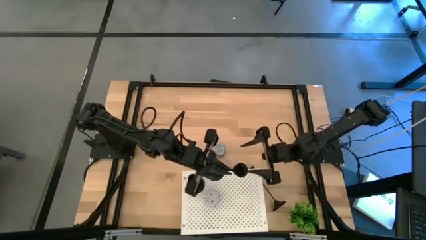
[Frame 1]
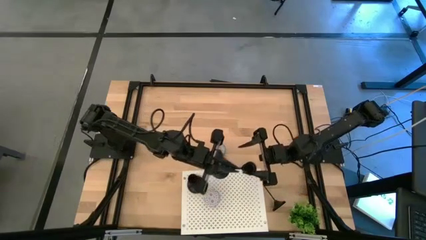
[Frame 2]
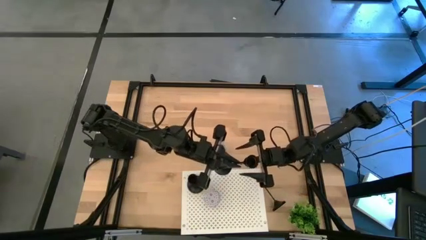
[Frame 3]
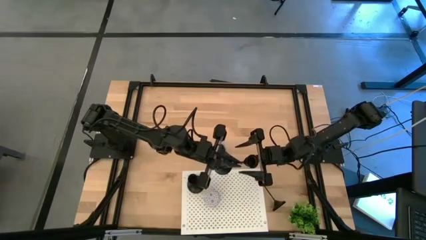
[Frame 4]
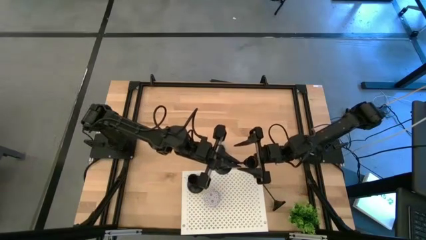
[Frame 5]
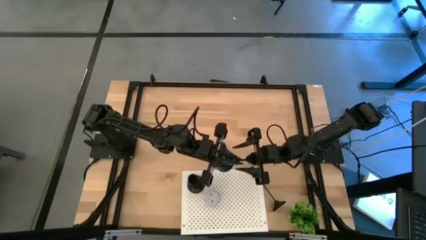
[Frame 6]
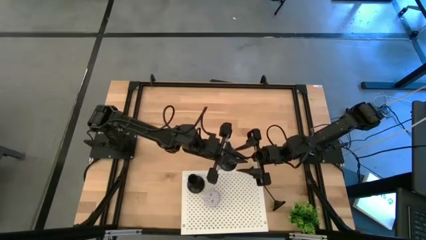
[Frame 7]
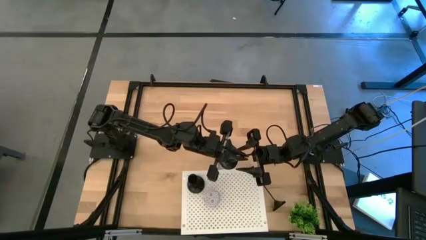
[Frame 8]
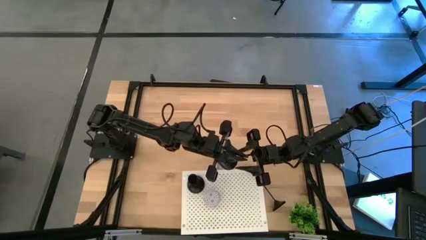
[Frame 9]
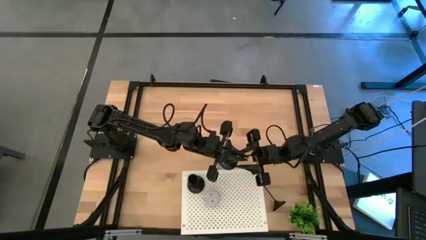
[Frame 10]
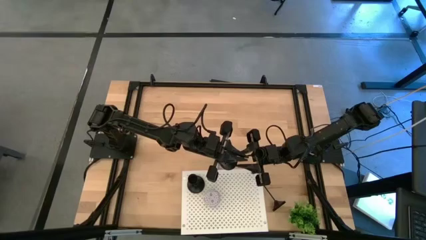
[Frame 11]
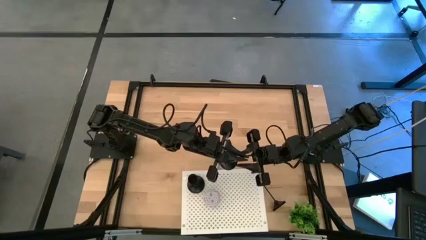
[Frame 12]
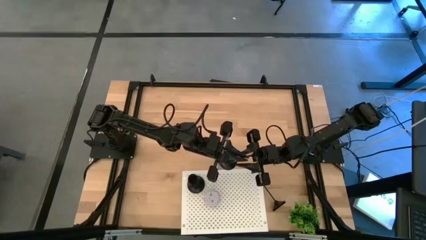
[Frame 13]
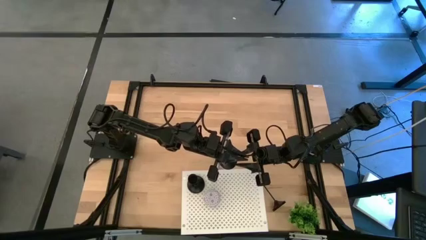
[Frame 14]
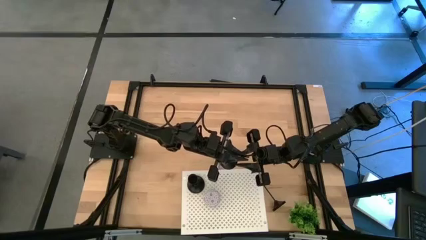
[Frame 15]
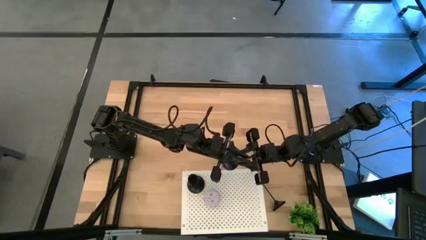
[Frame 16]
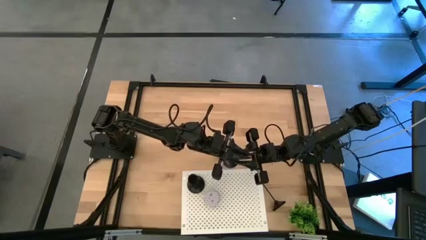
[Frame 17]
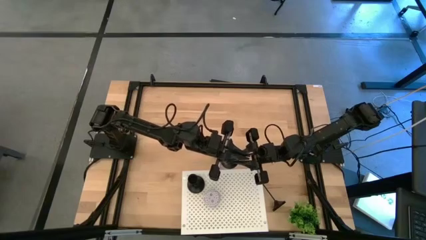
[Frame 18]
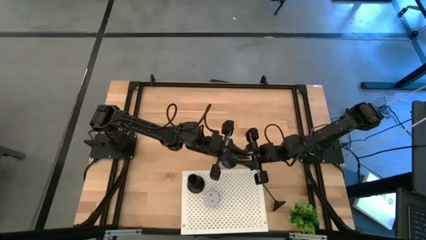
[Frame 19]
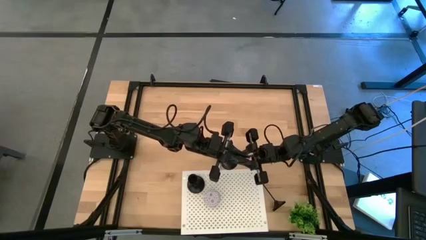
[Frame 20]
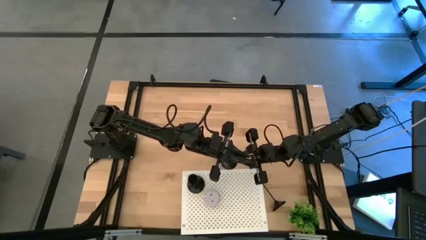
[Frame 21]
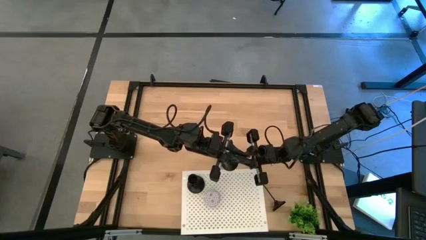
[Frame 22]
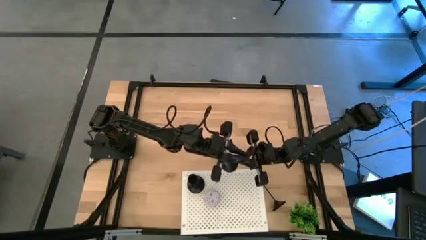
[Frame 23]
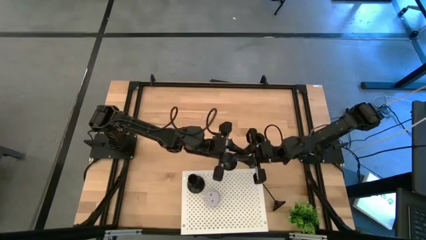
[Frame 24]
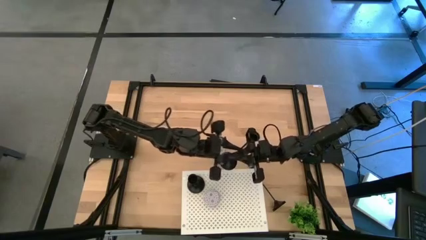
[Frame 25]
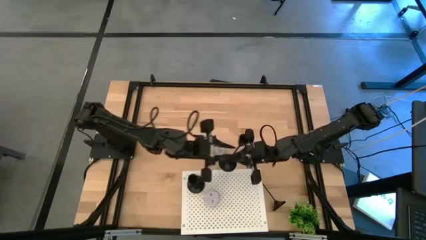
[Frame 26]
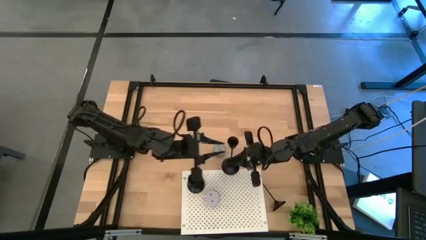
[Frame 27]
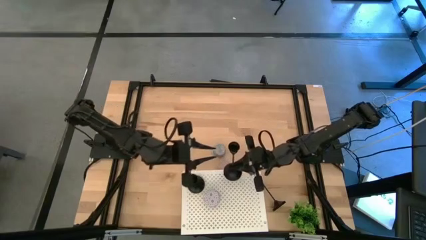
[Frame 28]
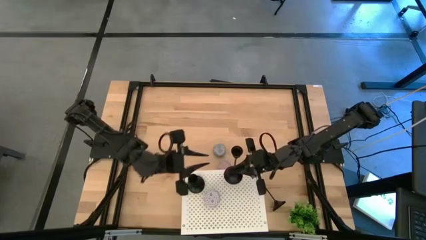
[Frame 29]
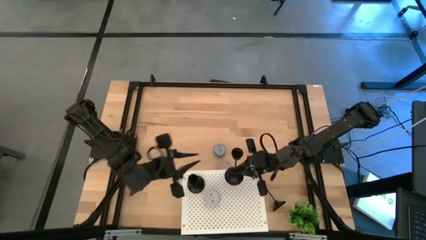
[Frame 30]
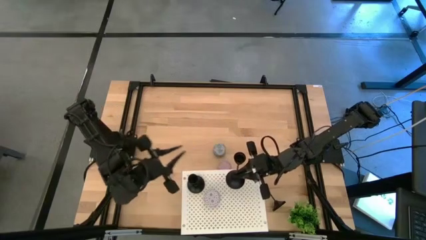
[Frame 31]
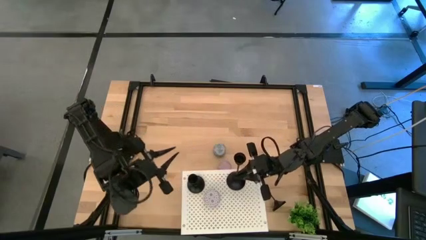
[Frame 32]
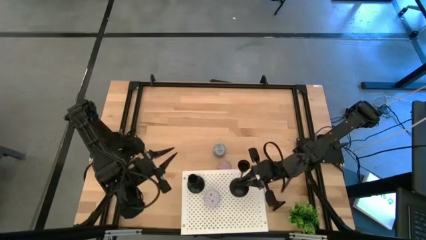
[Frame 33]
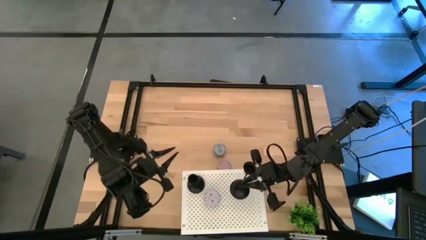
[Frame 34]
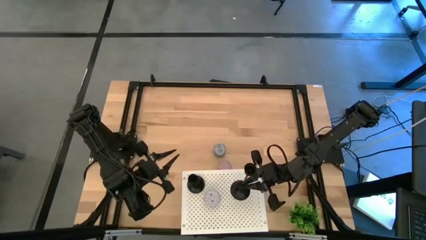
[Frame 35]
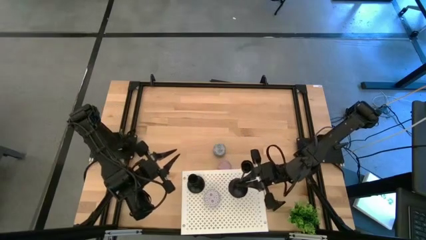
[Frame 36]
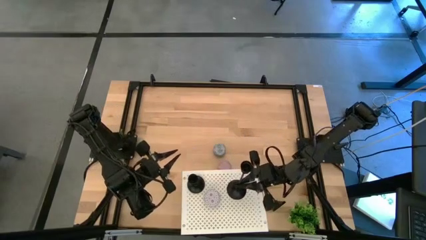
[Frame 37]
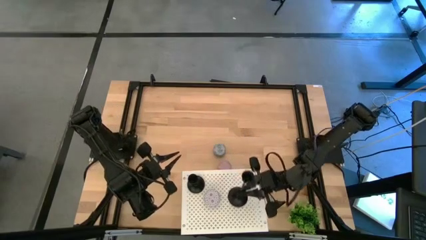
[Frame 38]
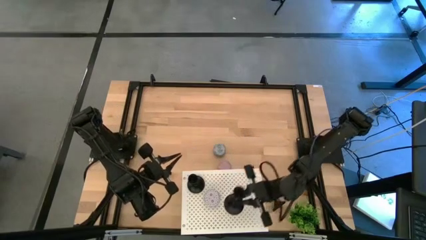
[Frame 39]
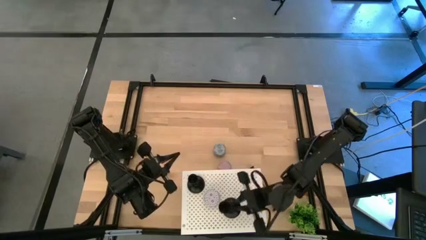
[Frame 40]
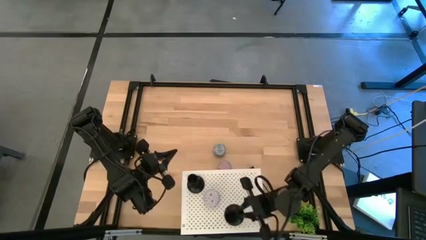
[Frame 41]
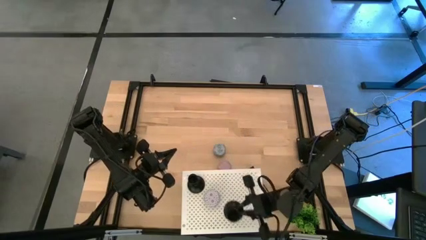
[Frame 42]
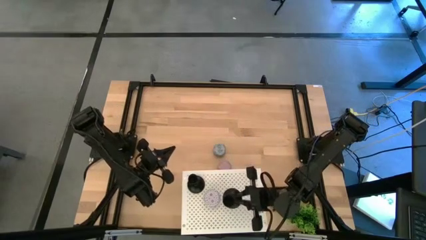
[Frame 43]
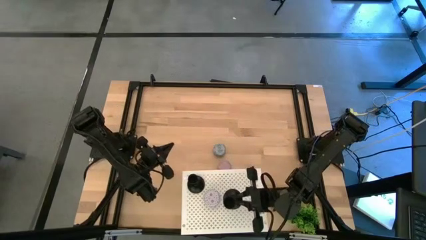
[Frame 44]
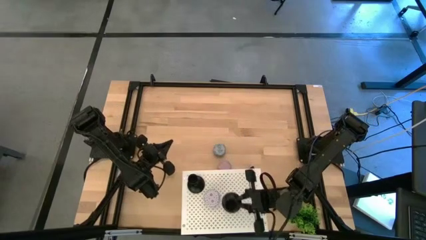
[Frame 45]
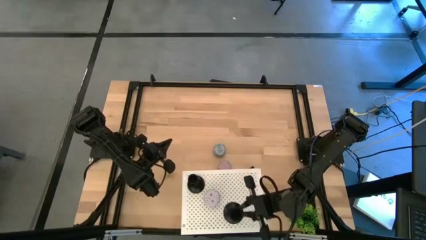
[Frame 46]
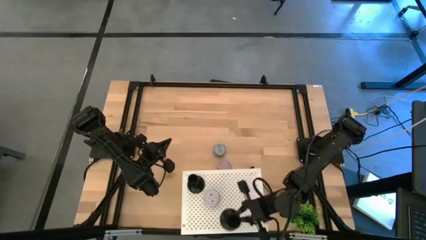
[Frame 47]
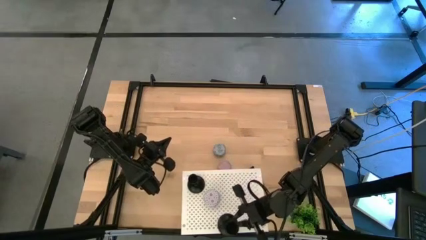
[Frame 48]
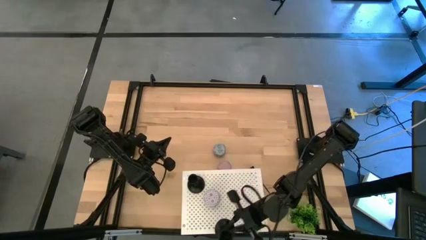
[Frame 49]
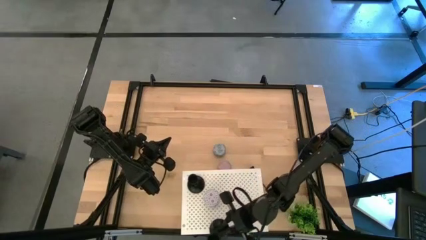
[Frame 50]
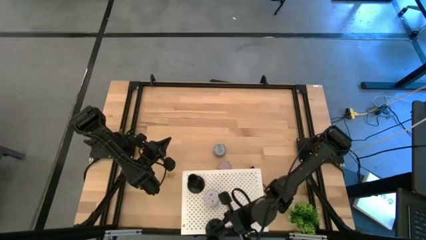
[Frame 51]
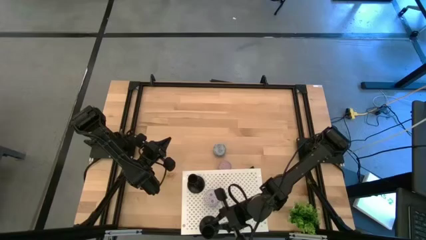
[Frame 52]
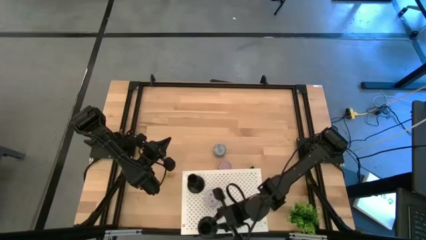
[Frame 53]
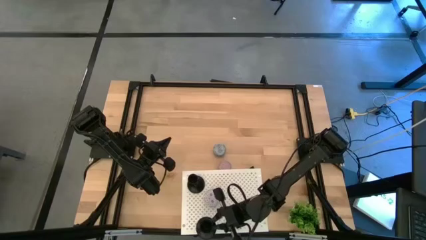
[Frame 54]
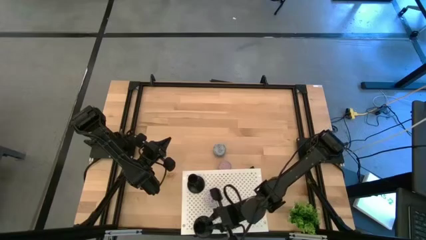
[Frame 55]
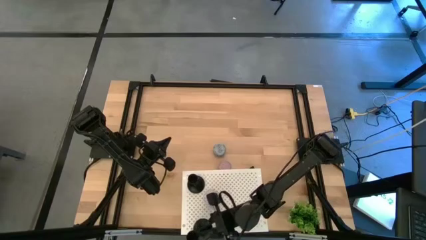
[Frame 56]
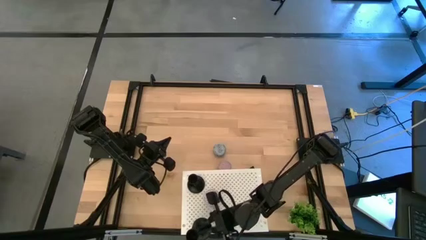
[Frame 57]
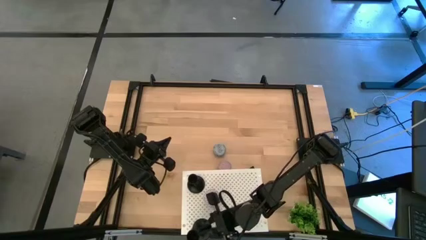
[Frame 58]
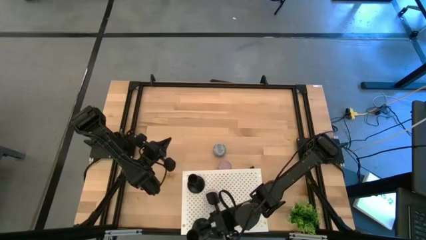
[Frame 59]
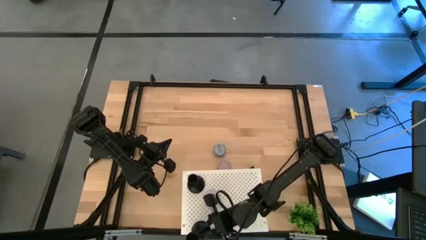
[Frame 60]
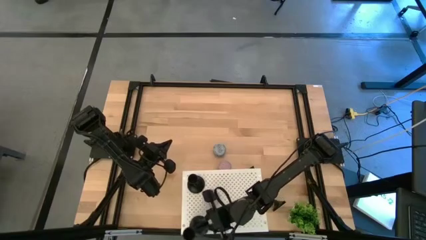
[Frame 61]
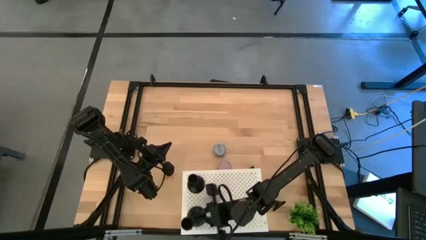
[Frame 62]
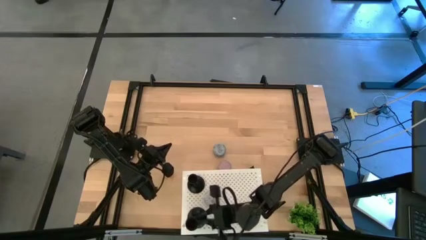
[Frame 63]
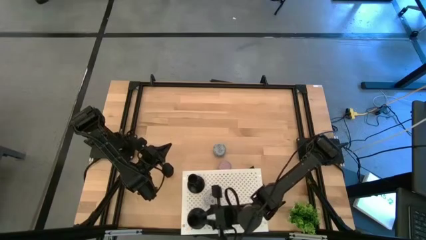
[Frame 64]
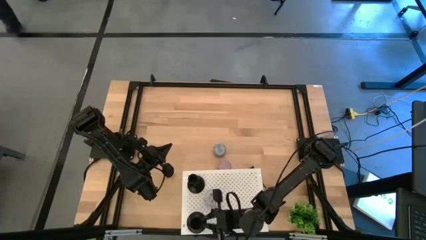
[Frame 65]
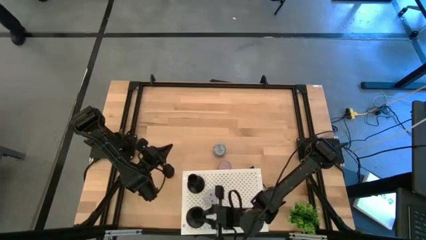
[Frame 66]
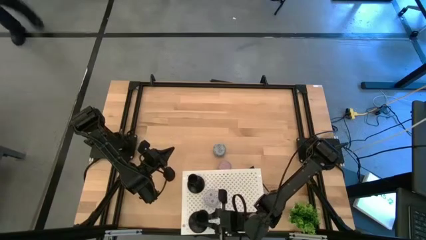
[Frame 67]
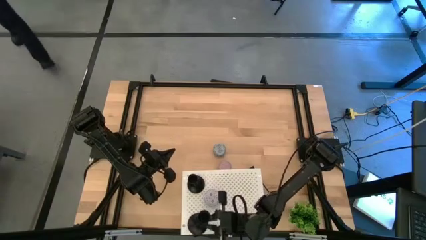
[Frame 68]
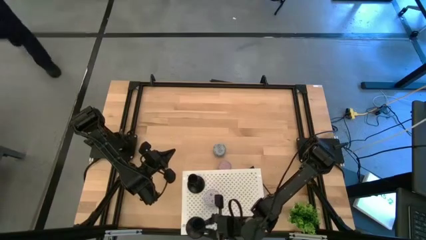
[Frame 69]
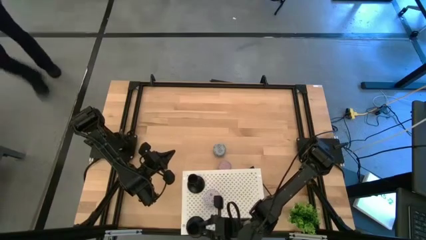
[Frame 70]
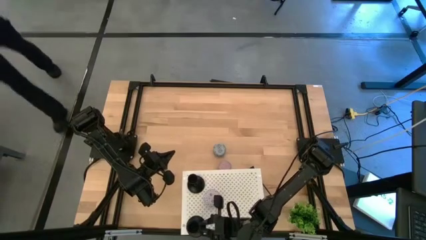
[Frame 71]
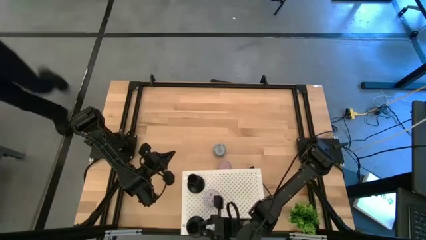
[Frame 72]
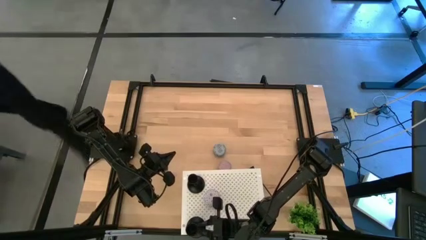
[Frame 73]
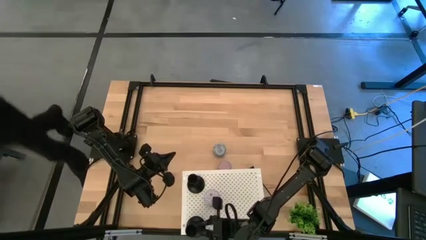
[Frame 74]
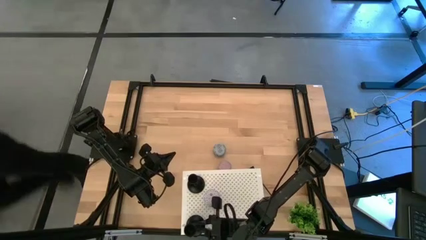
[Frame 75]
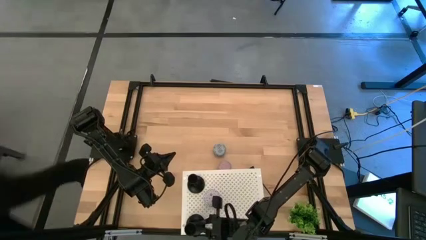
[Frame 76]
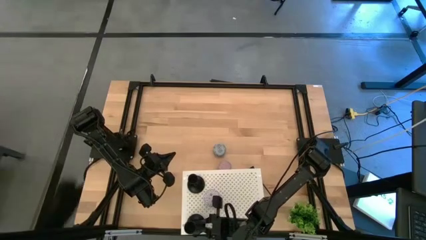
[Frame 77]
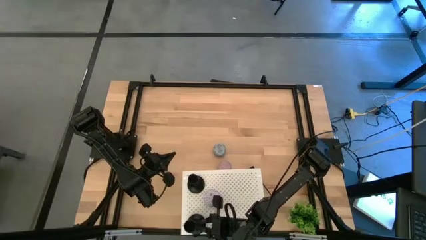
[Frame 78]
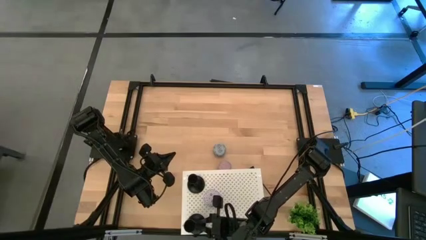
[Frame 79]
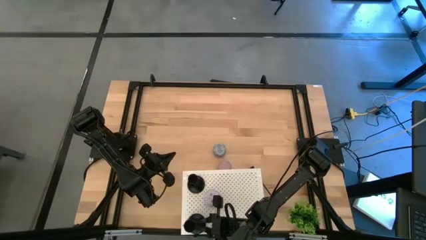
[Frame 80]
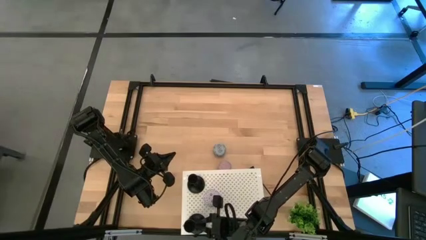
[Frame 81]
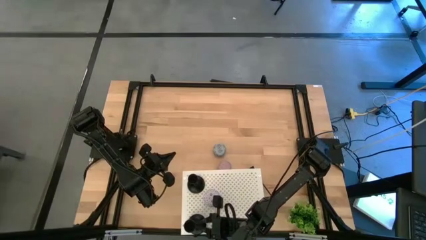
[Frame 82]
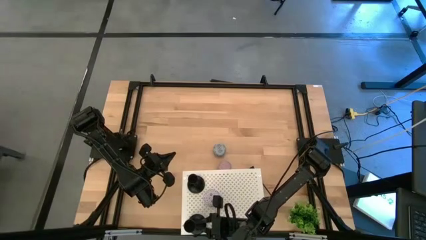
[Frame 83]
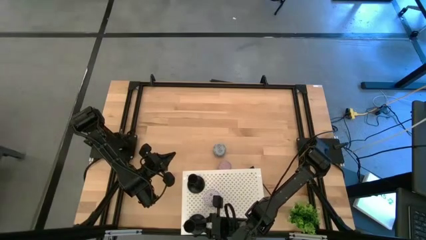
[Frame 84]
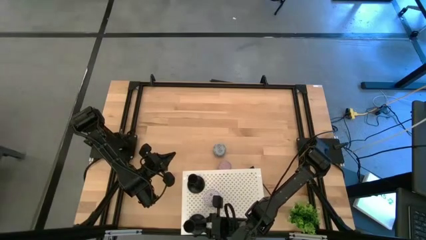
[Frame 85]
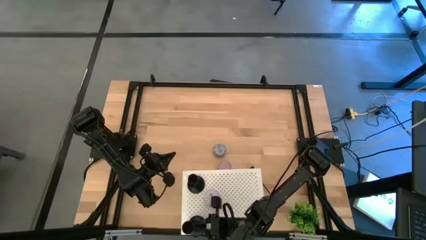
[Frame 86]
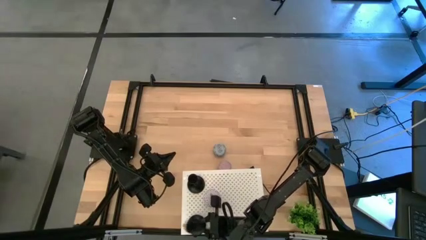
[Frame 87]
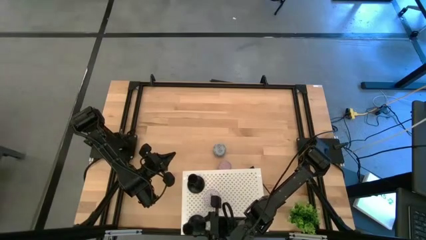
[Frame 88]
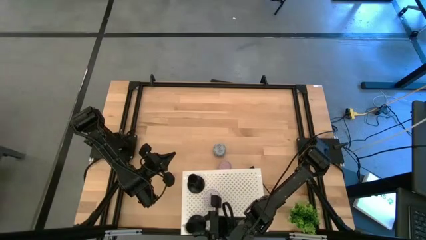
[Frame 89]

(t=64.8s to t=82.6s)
Task: Pick & Place candle stick holders
Put the top black candle holder on the shelf
